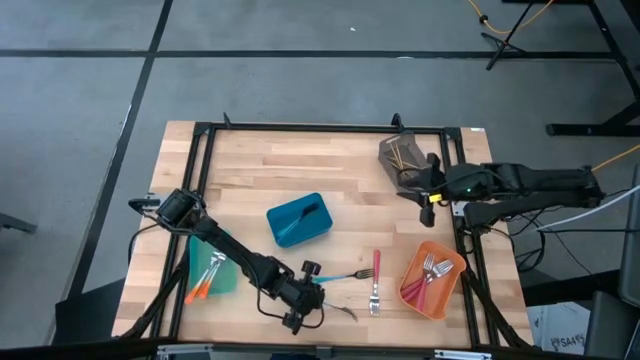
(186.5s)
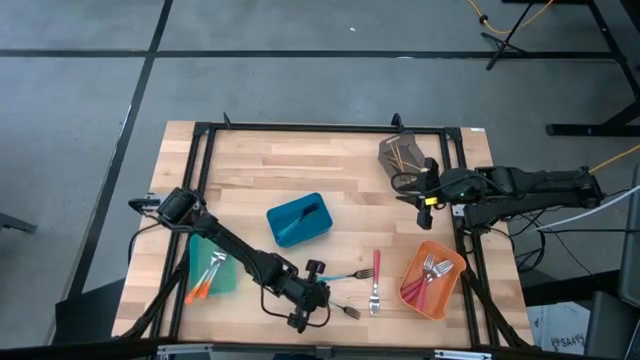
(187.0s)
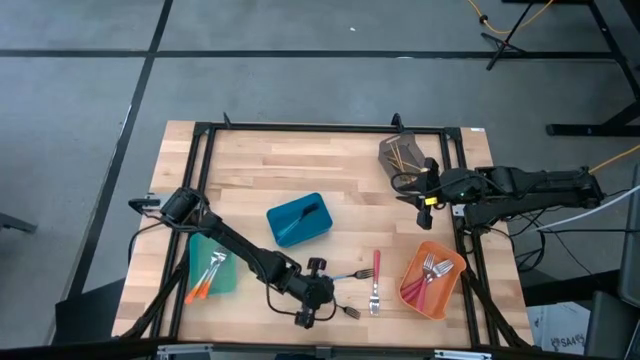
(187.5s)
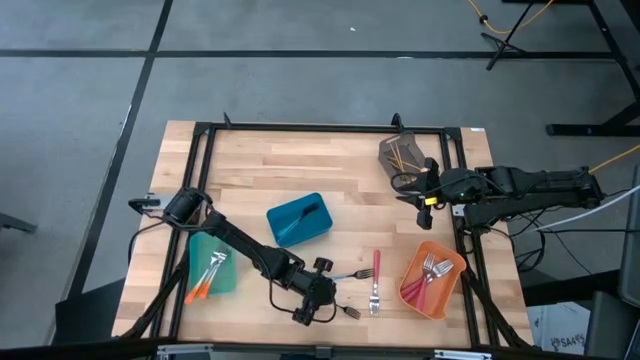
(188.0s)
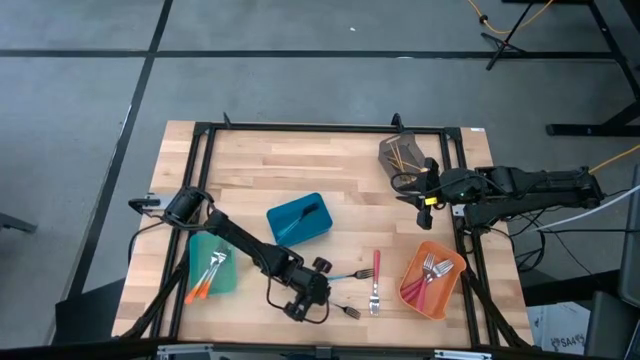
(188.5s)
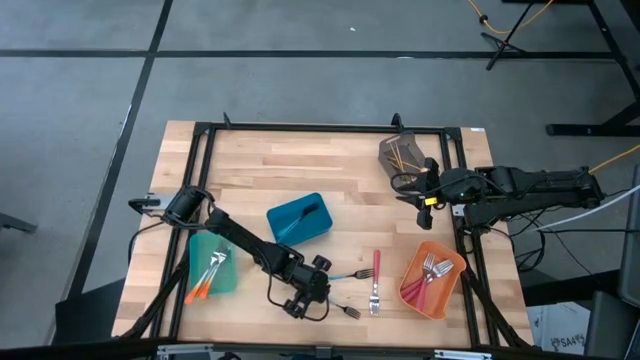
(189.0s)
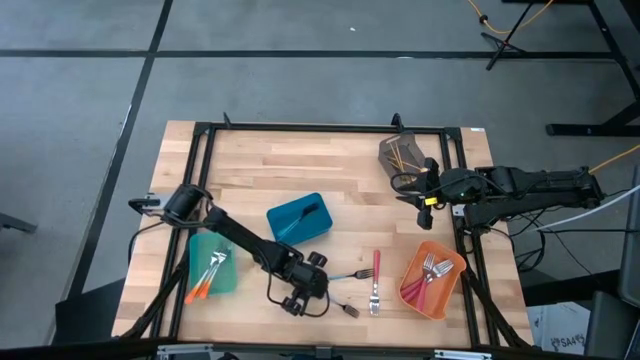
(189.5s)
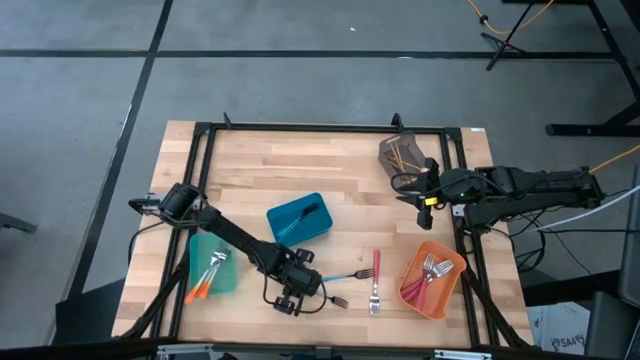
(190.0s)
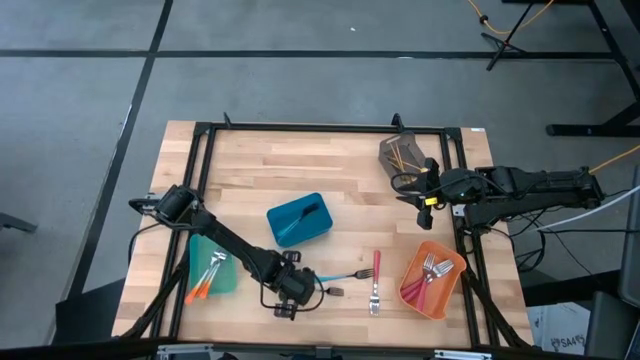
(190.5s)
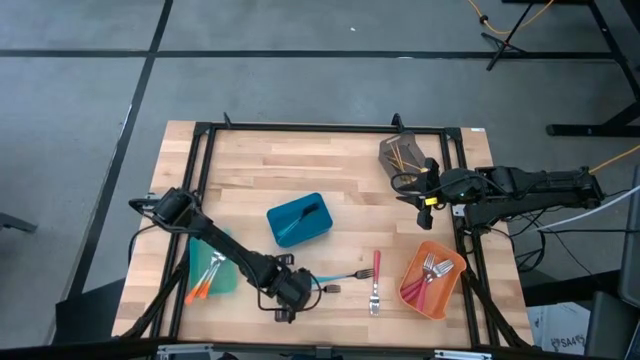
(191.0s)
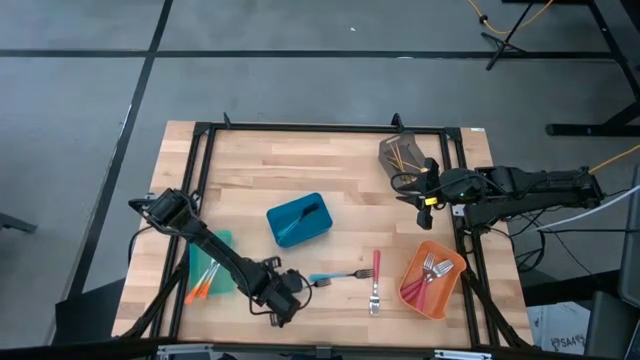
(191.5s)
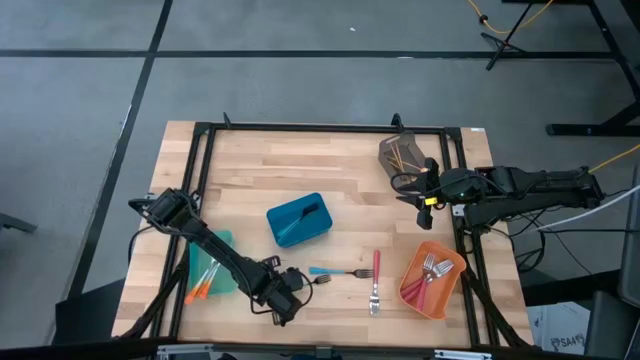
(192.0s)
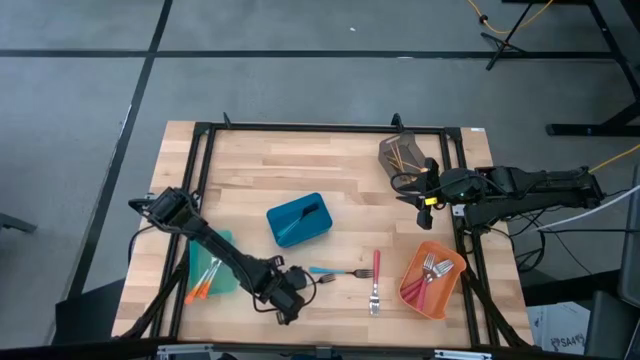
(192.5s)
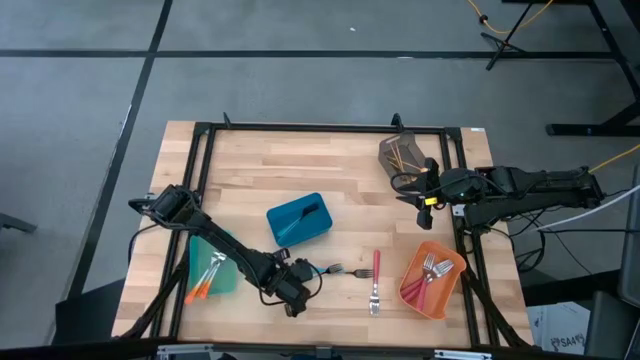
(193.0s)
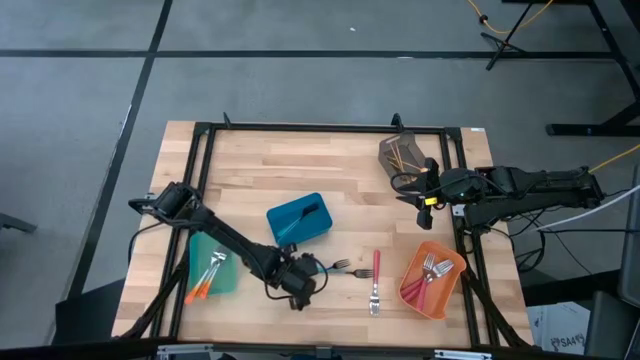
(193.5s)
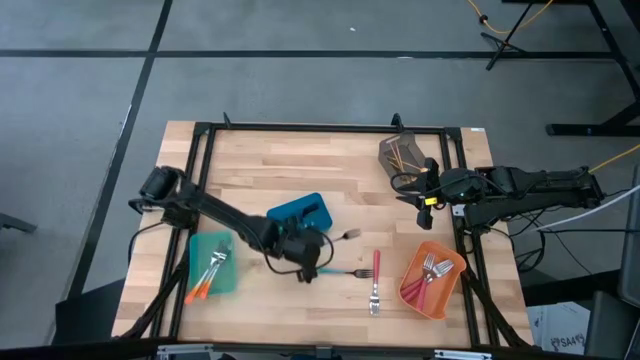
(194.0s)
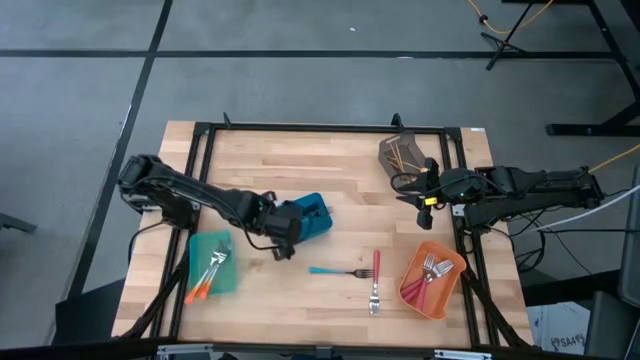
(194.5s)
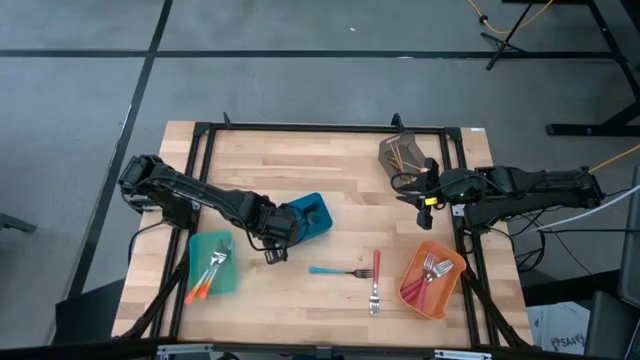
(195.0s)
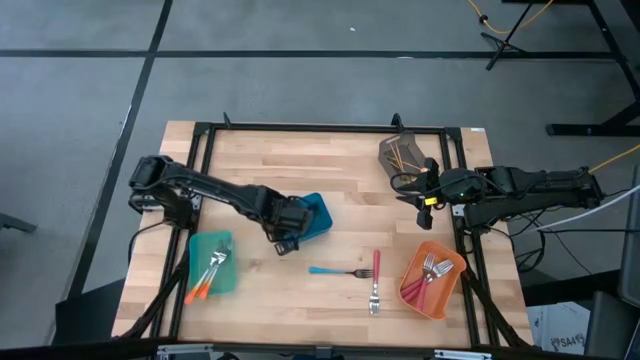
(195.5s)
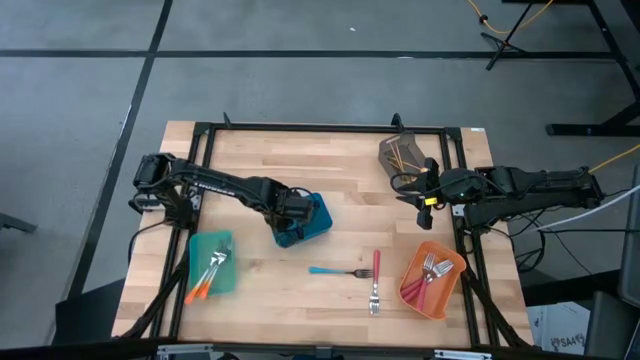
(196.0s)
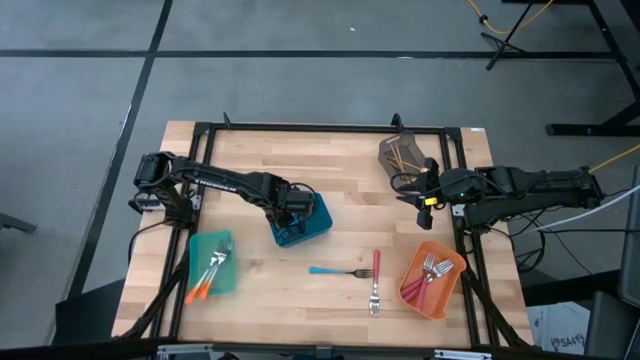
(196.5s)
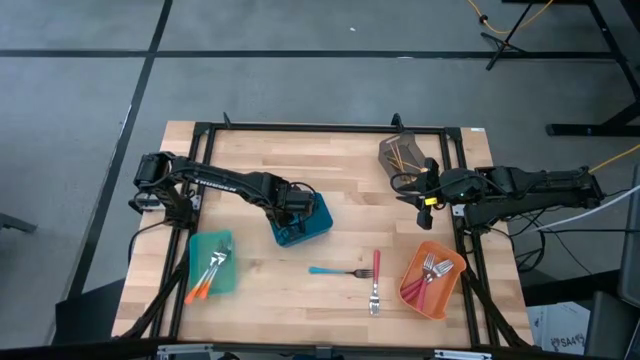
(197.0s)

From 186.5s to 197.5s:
Task: Sort silverware by color (type)
Put the bottom blue fork into the dark blue bin

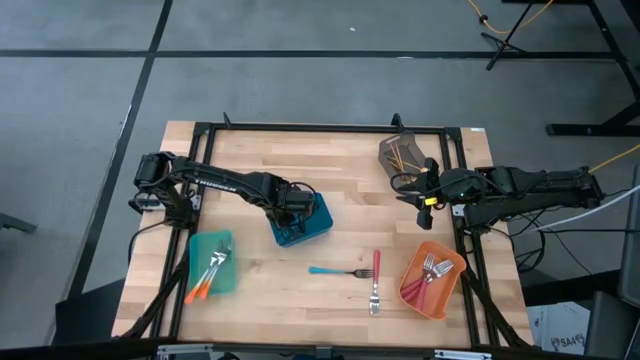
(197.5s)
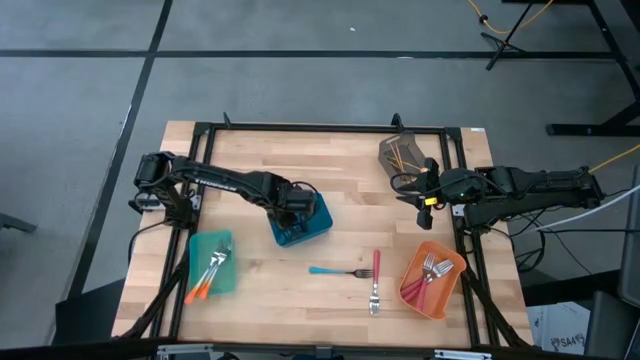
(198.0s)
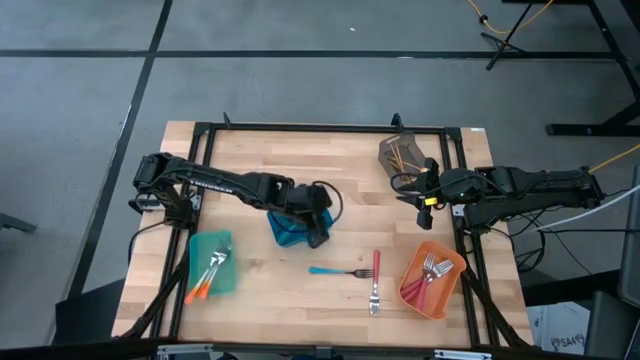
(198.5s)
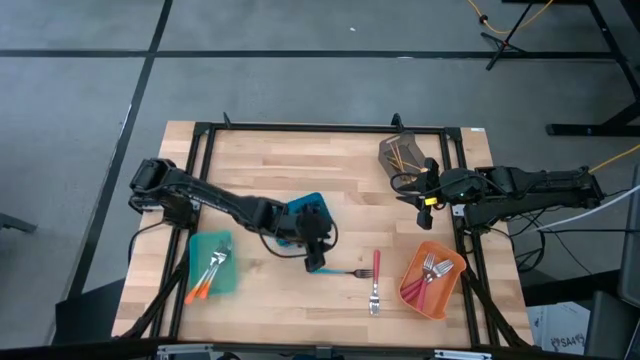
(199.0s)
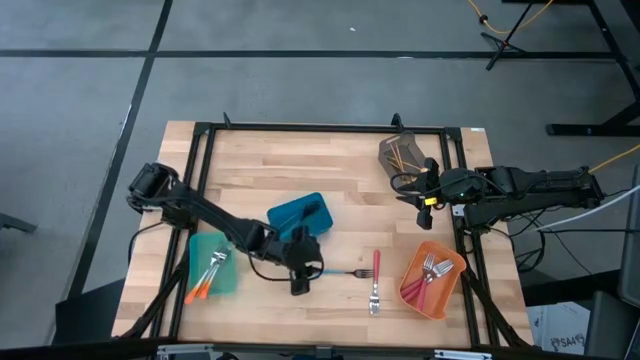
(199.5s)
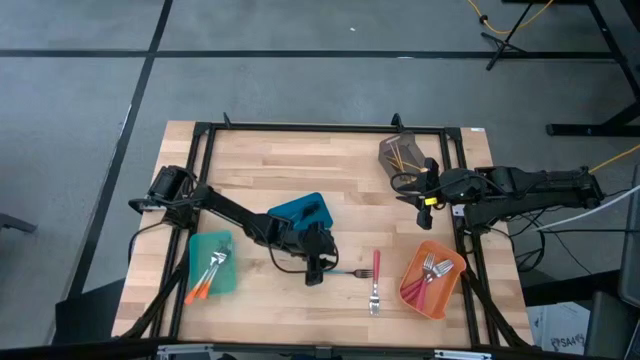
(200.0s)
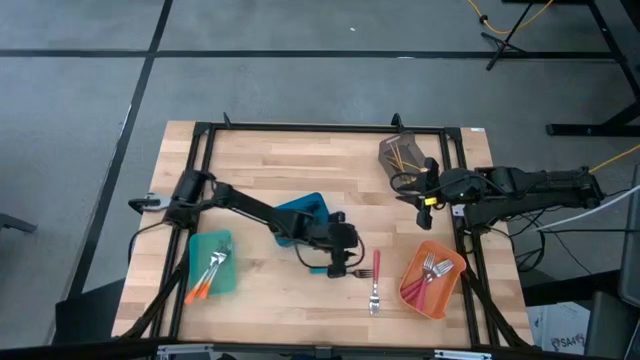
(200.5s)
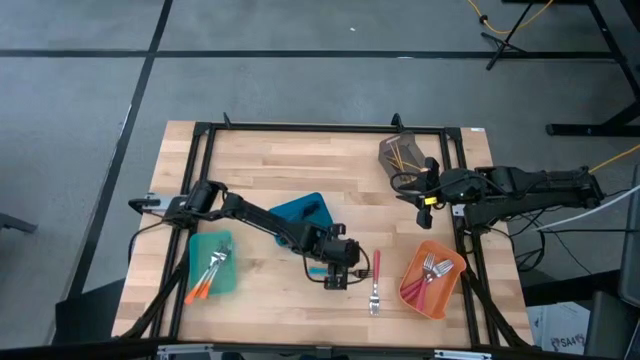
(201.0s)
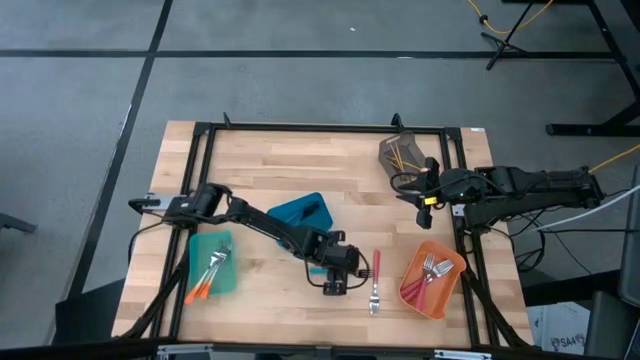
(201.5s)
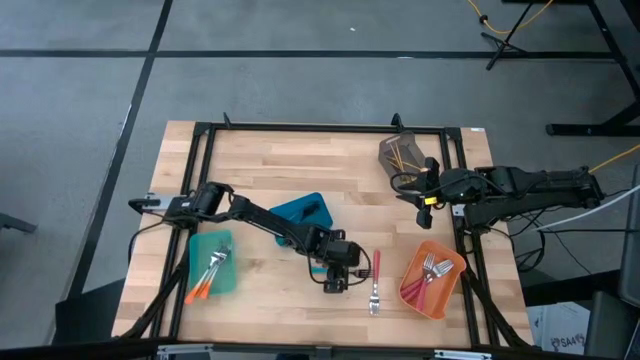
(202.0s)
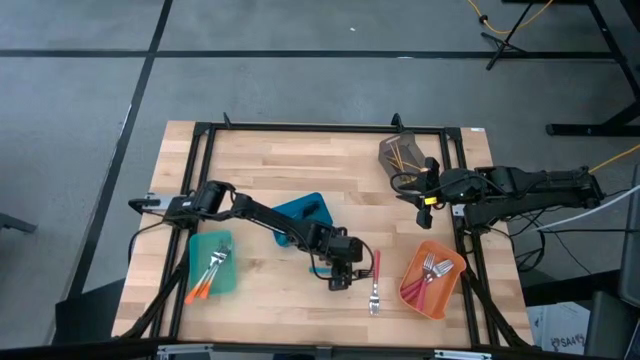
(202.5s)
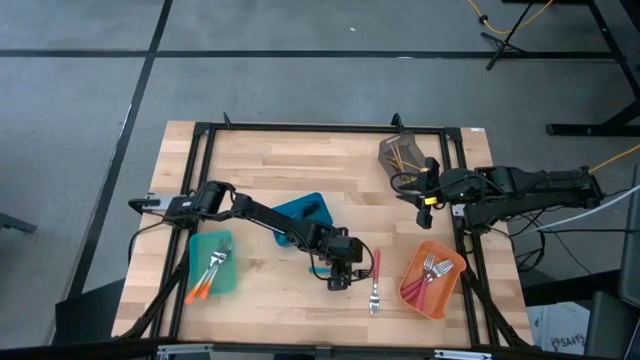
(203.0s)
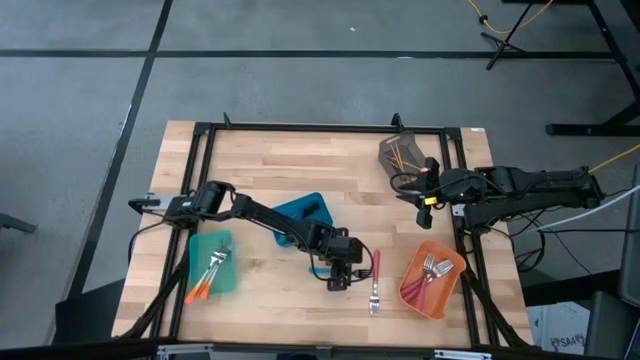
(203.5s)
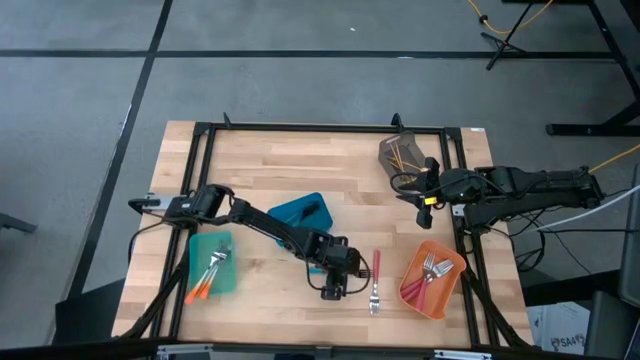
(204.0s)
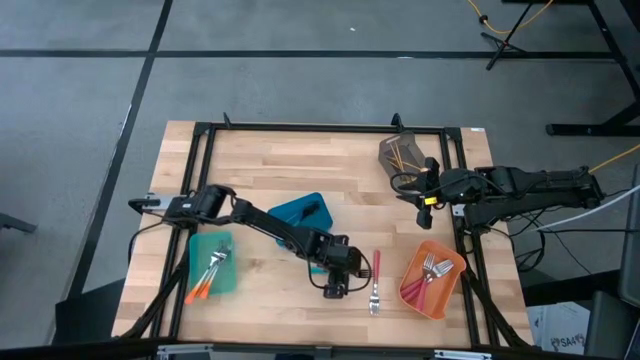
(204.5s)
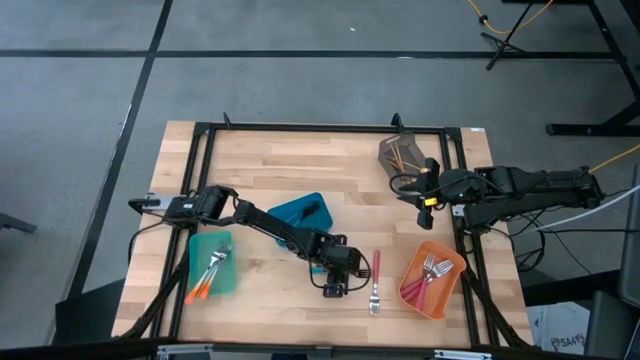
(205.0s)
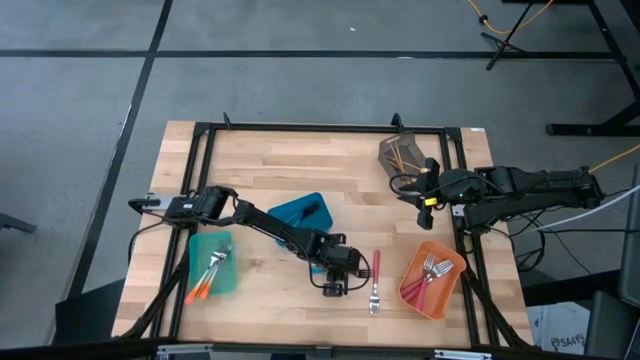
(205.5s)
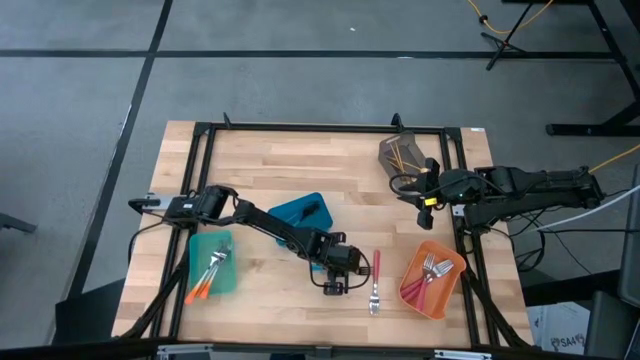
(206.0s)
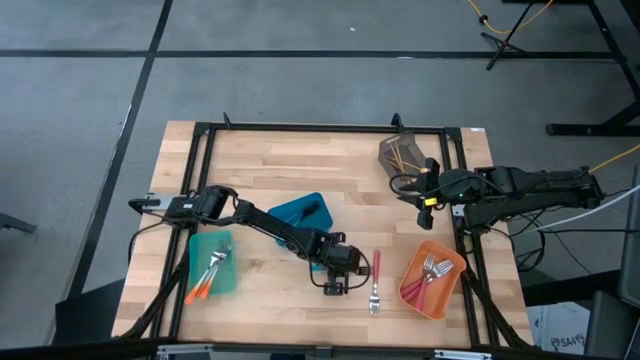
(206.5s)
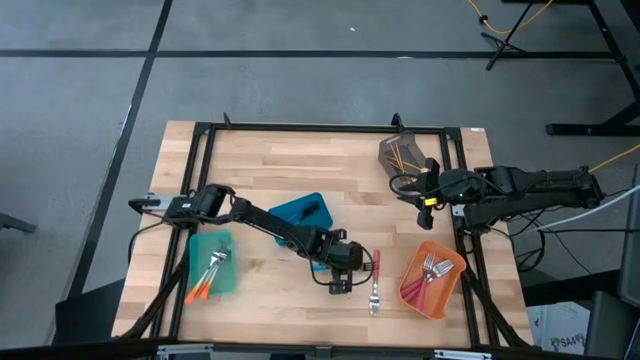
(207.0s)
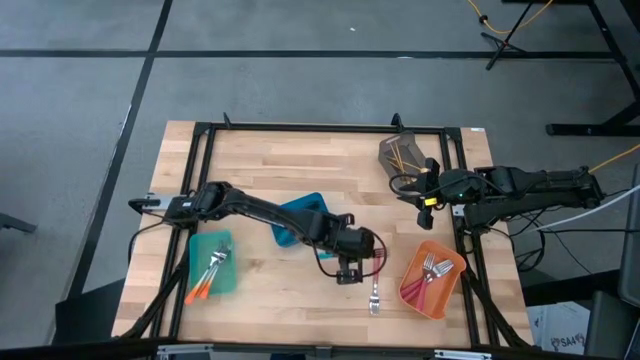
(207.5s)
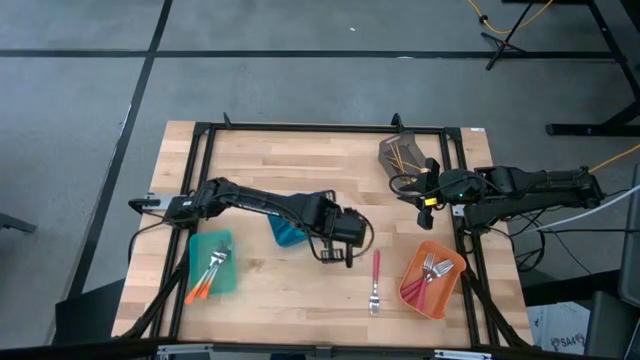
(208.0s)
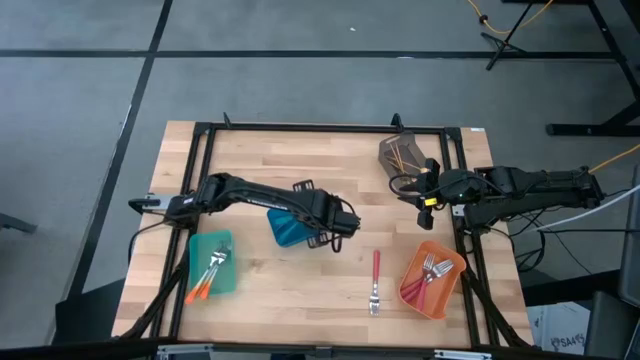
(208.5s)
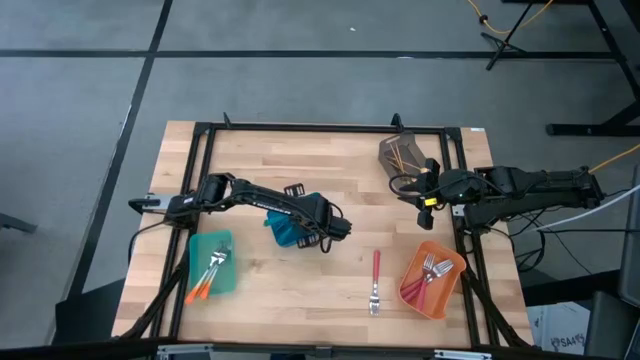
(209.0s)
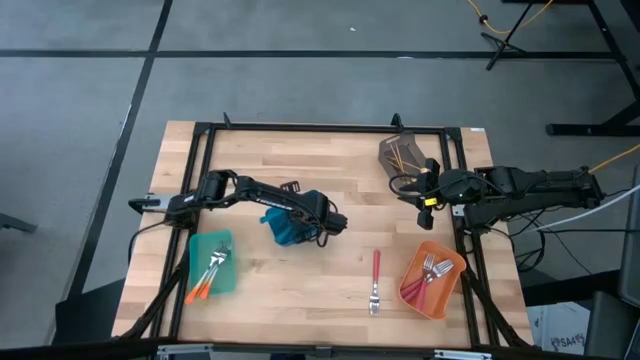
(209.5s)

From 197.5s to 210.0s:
Put the blue fork into the dark blue bin
